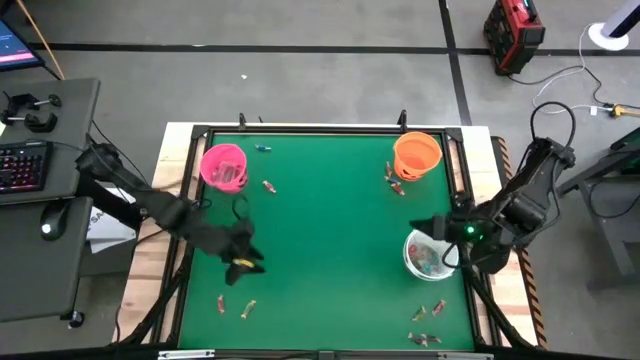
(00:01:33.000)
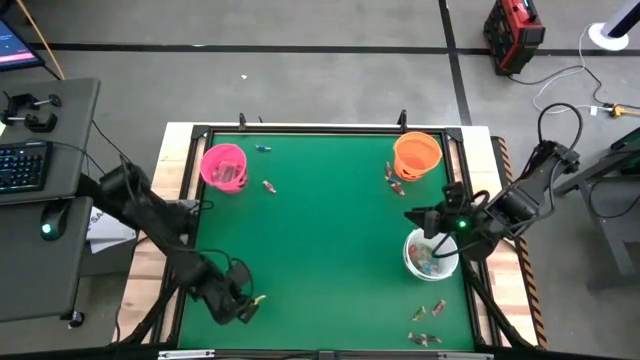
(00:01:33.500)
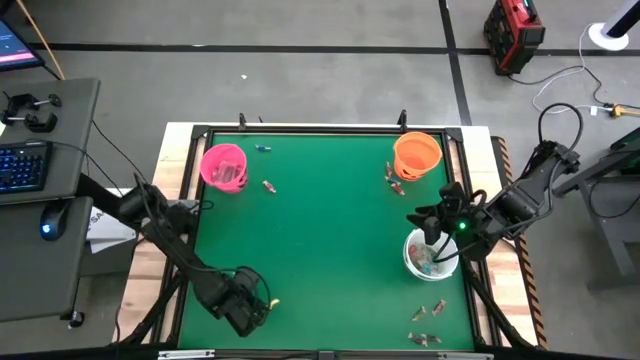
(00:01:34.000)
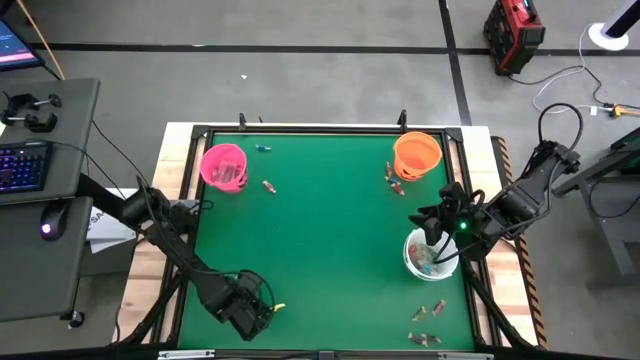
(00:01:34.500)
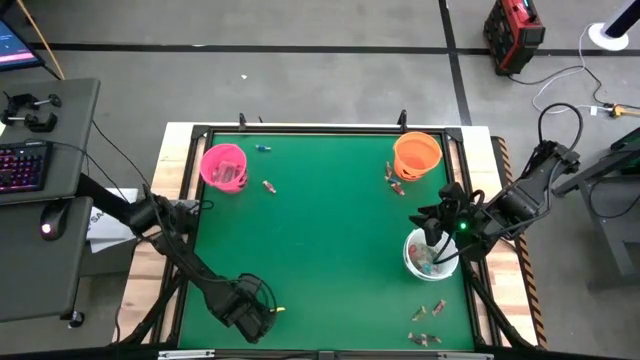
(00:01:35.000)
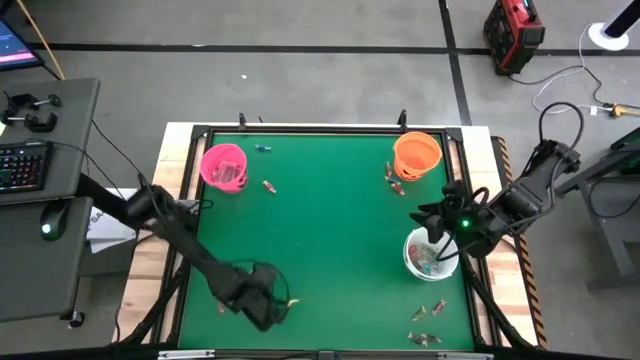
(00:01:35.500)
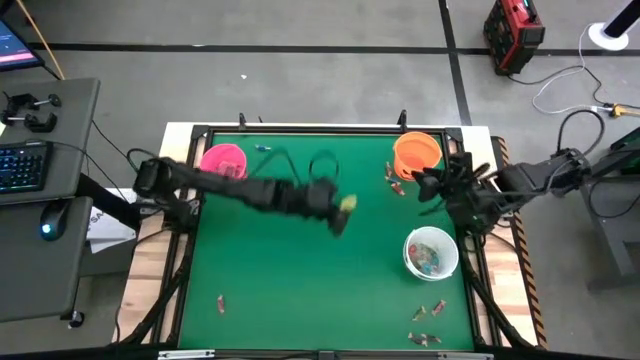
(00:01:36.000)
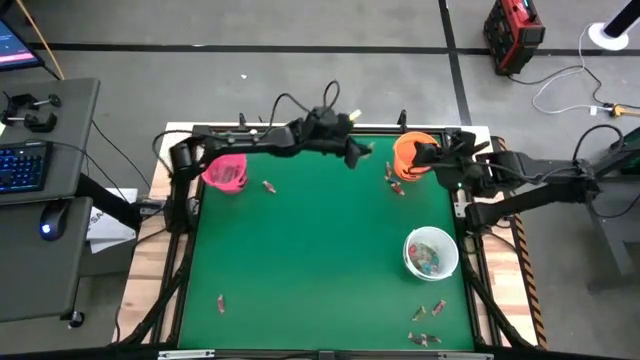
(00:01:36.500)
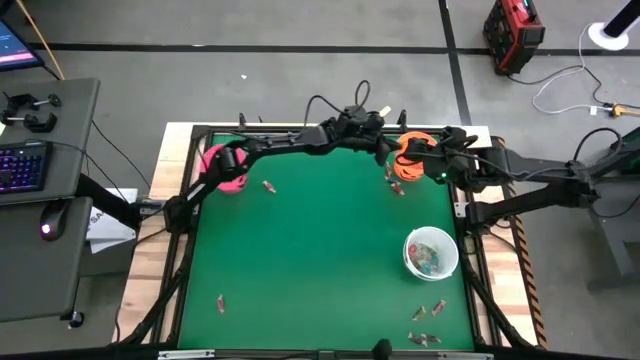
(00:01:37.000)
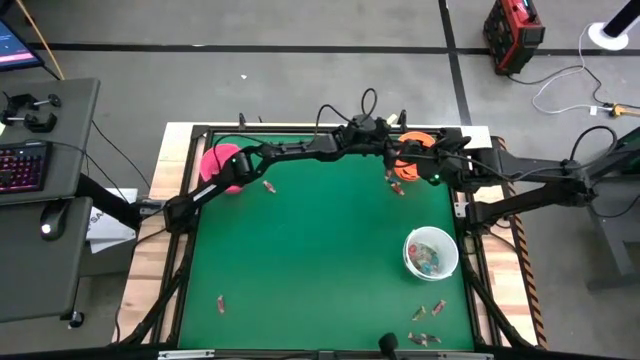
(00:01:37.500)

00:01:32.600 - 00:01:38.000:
Task: Sort candy by brand, put in halloween buckets
Put the green candy into the orange bucket

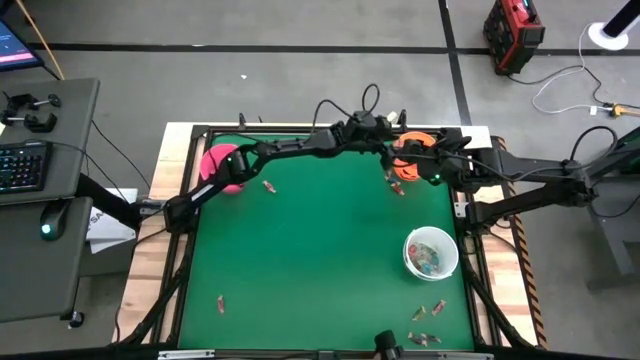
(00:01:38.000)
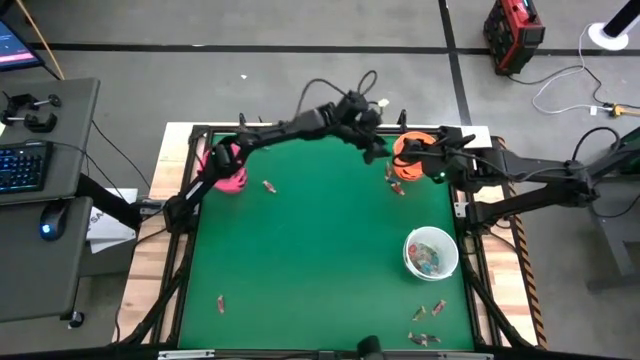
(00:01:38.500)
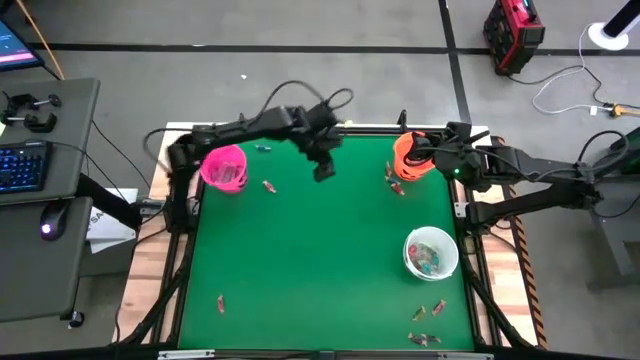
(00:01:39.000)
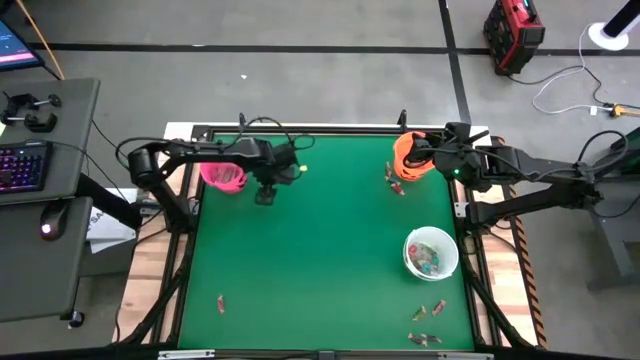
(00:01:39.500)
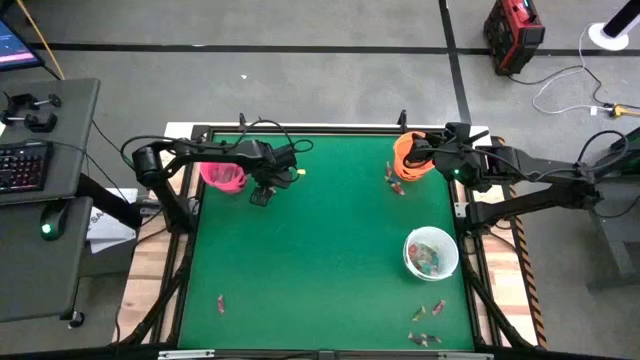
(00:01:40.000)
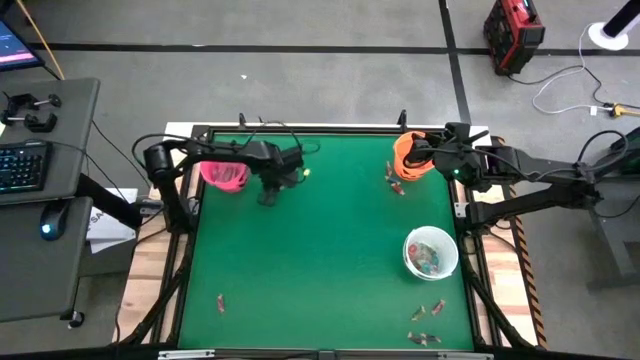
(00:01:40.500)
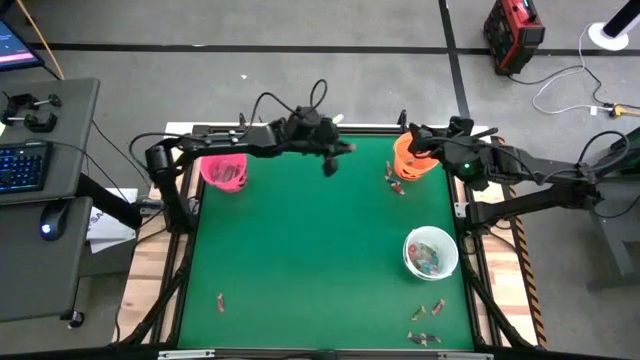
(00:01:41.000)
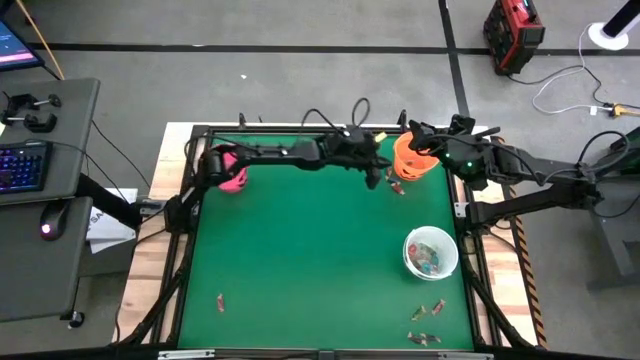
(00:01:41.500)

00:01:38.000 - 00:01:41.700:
Put the pink candy into the orange bucket

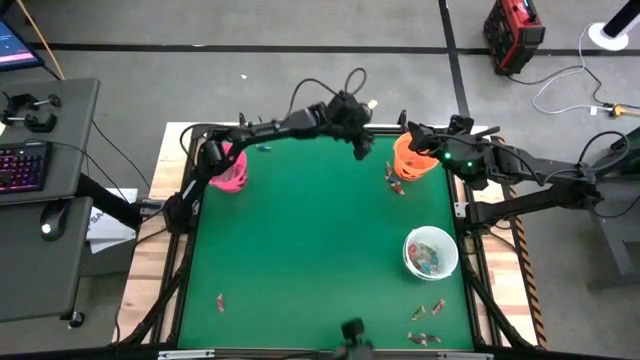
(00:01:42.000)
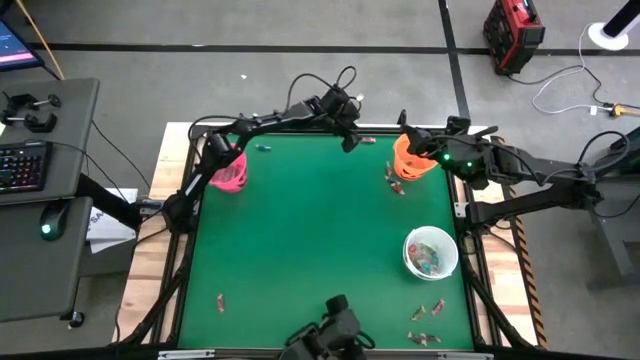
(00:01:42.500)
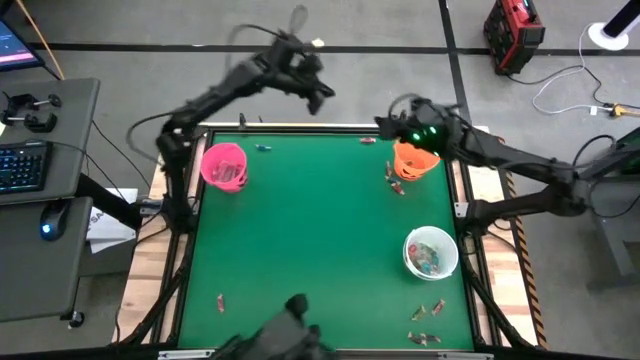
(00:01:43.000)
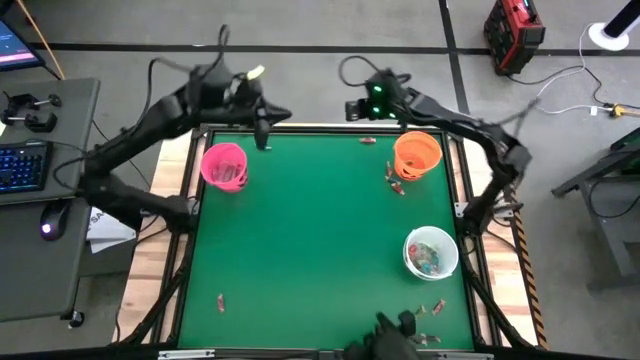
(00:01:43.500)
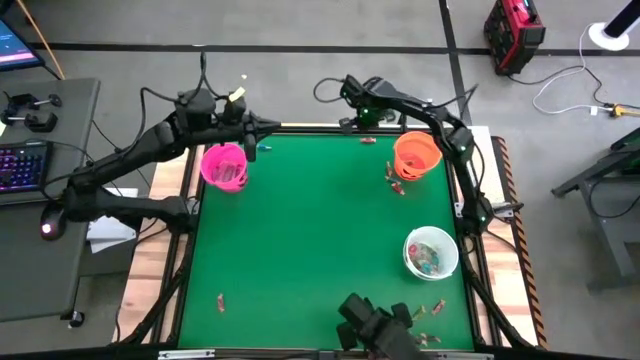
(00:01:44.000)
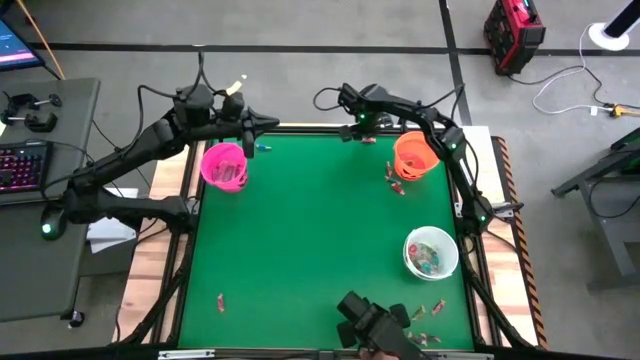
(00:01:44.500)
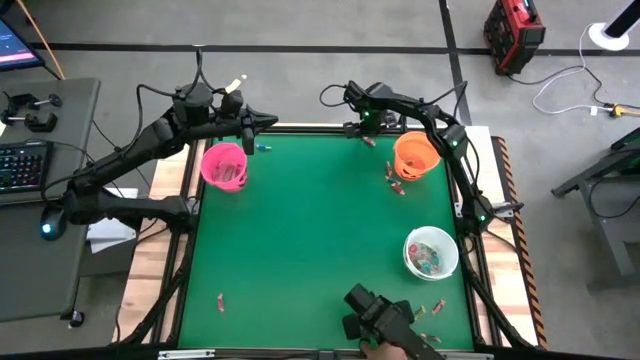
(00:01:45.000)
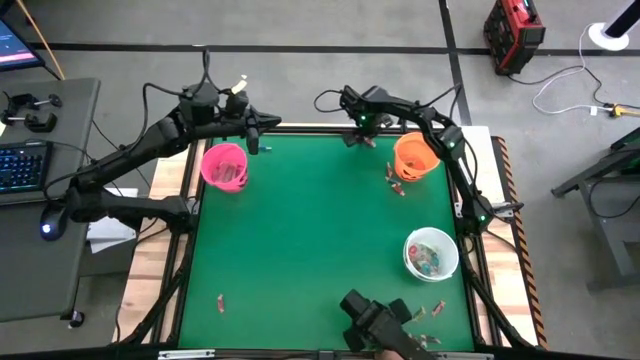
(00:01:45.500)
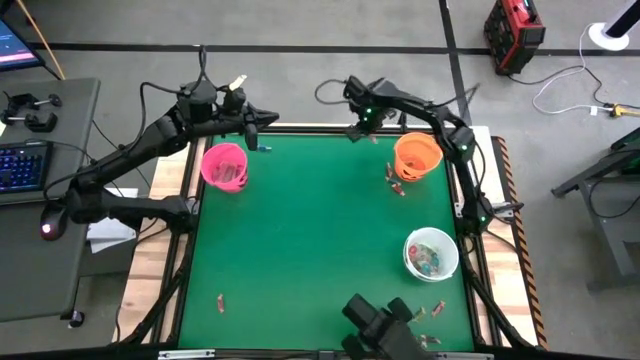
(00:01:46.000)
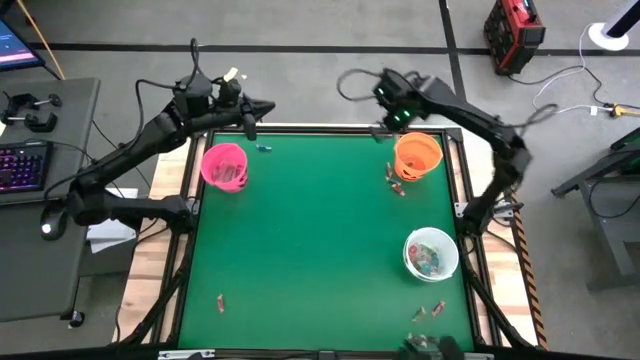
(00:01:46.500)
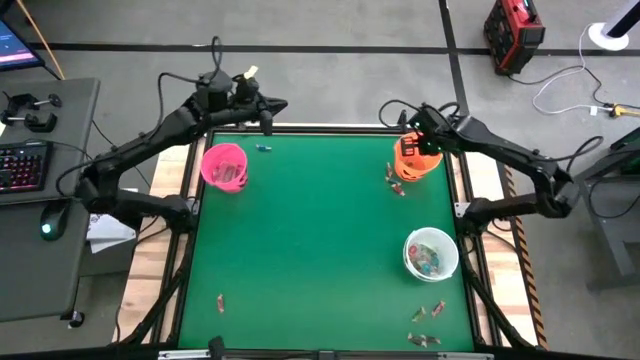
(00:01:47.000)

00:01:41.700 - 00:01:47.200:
Put the pink candy into the orange bucket

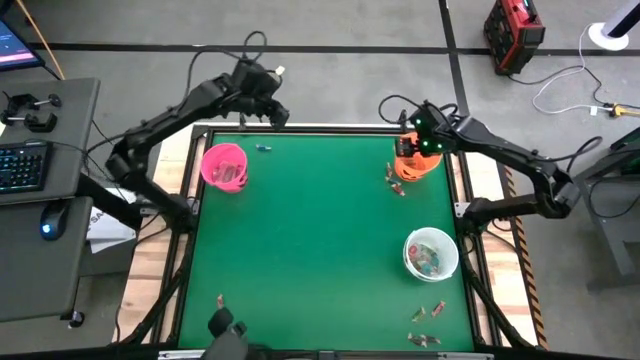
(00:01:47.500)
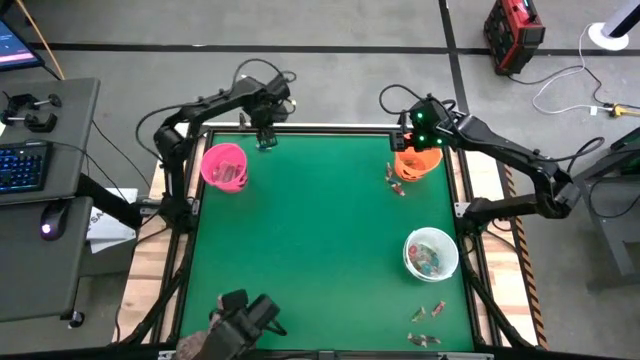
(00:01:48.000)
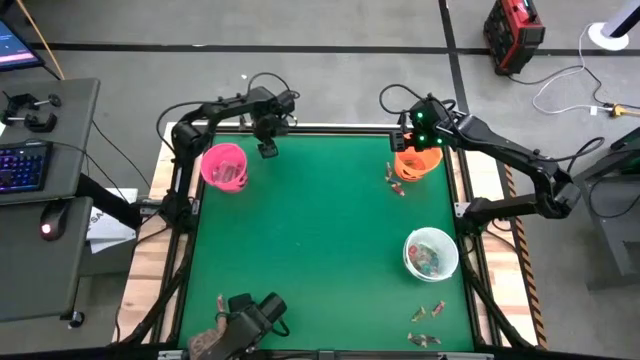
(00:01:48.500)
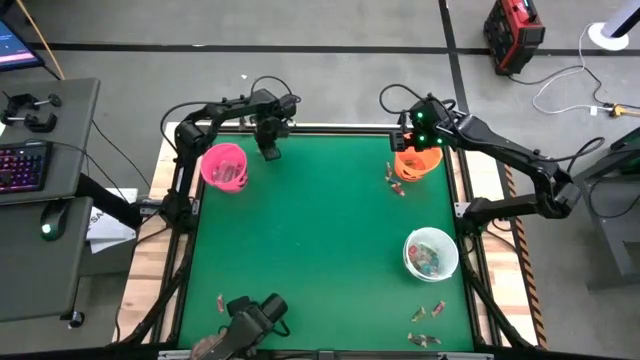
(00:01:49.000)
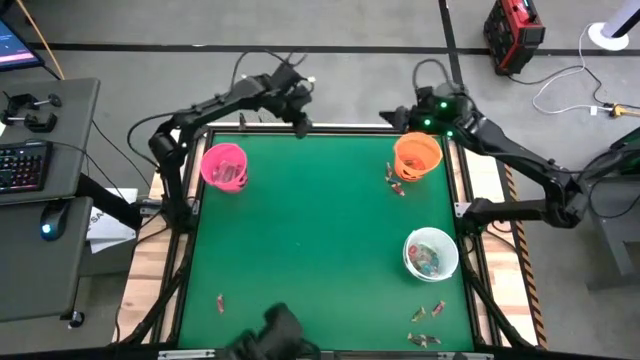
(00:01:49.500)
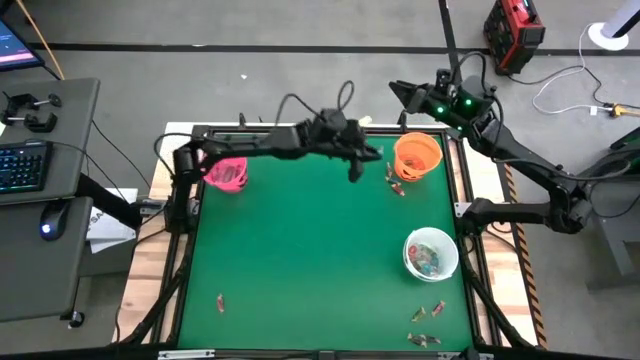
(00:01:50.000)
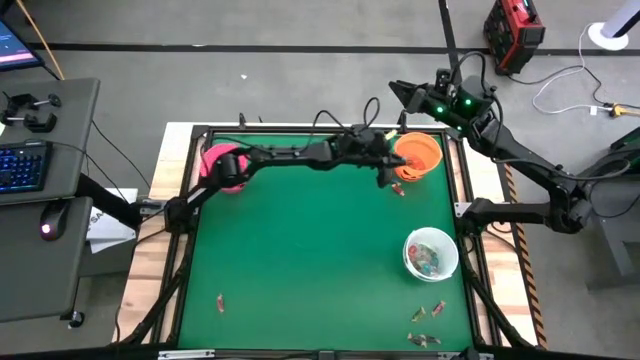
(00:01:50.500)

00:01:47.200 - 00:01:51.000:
Put the blue candy into the orange bucket

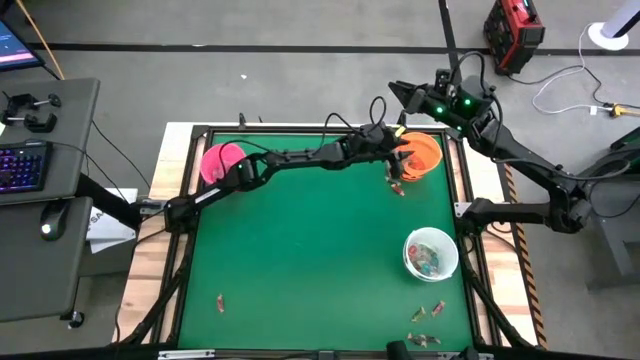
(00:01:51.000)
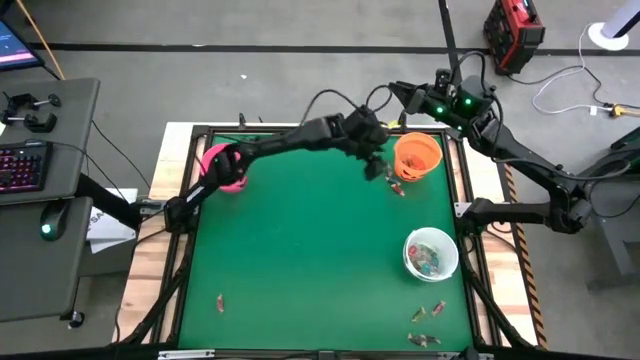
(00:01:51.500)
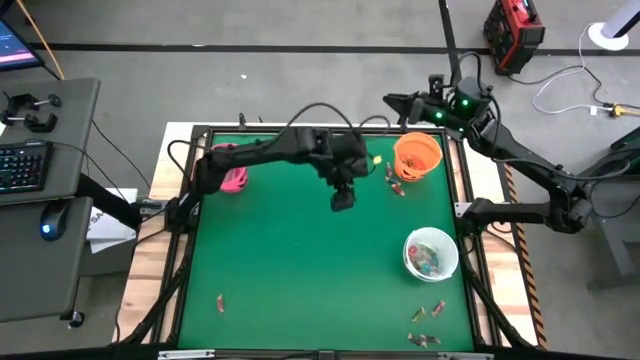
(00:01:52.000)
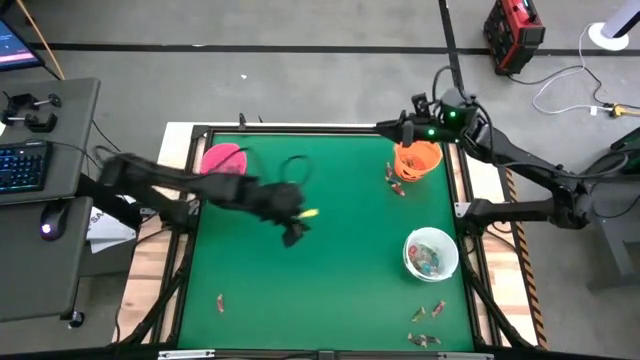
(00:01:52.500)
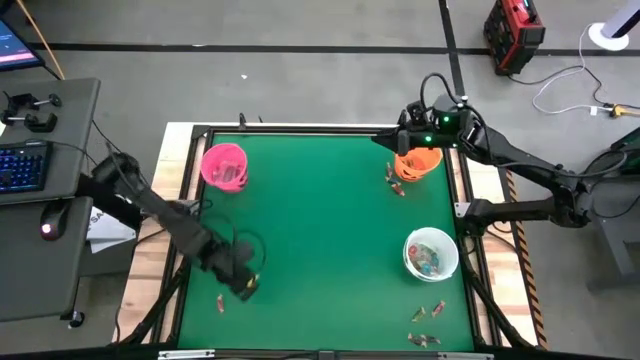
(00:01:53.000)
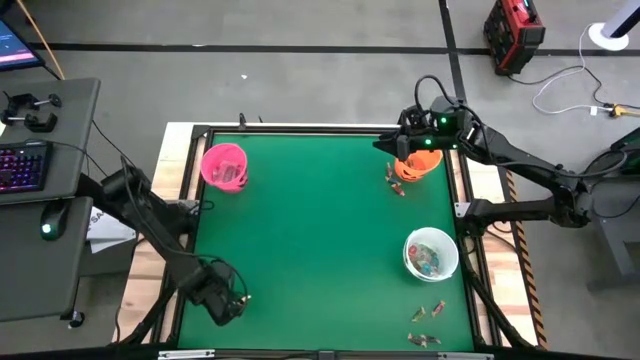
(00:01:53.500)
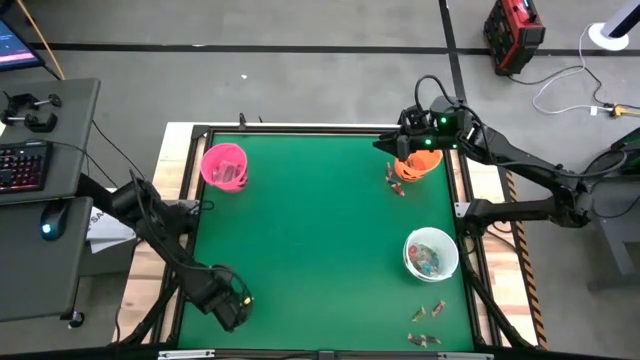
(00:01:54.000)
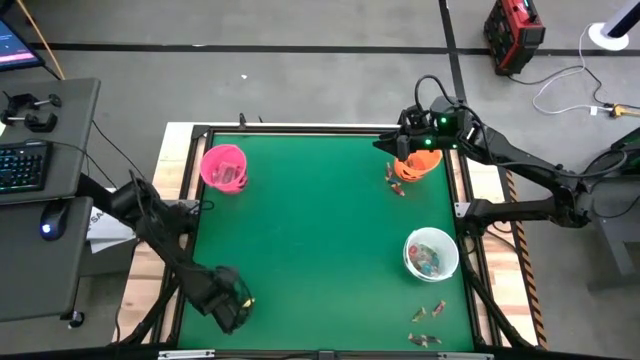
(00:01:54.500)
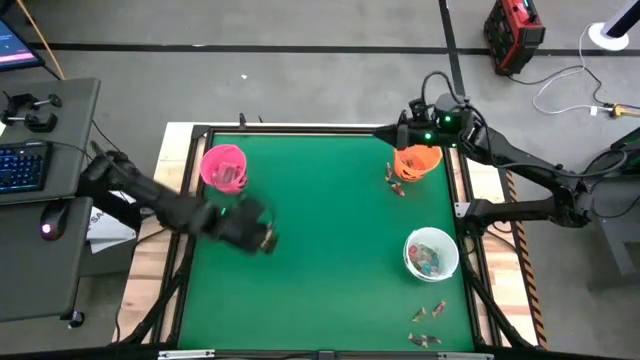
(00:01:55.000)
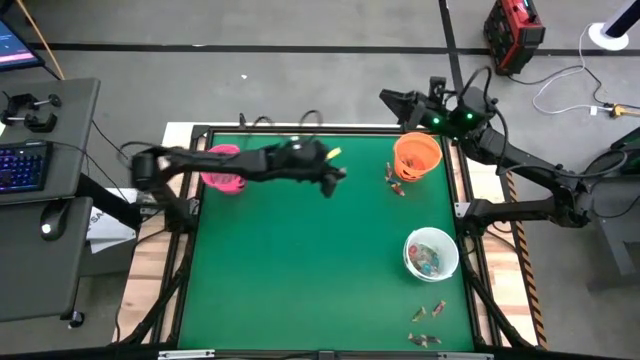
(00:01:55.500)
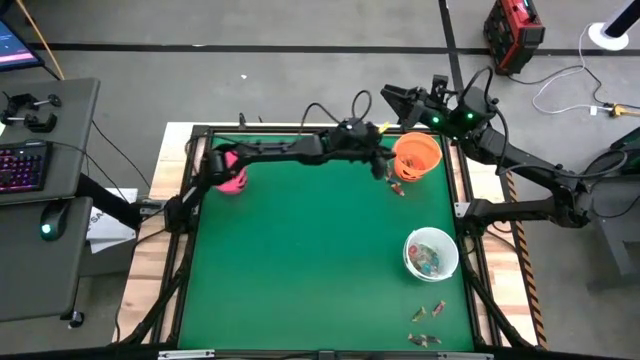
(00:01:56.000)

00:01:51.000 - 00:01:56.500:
Put the pink candy into the orange bucket
